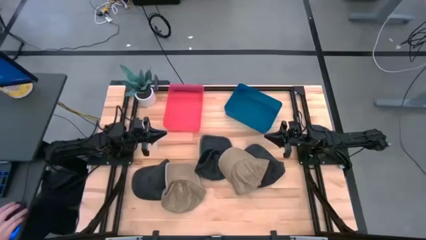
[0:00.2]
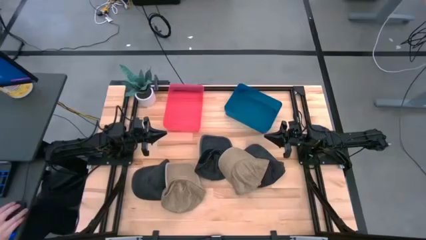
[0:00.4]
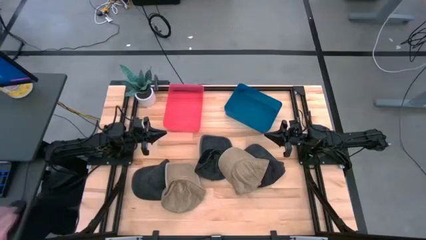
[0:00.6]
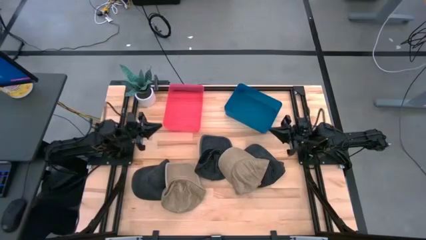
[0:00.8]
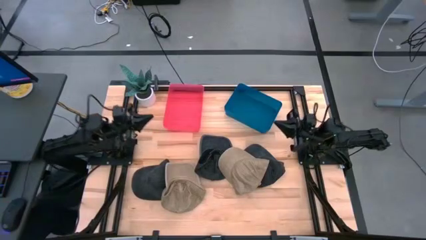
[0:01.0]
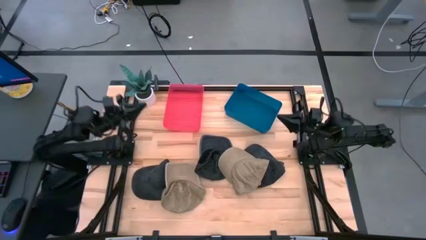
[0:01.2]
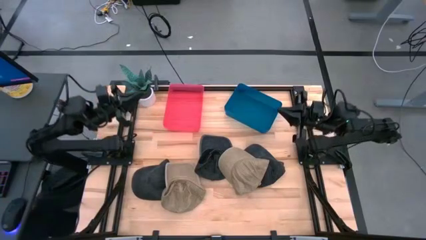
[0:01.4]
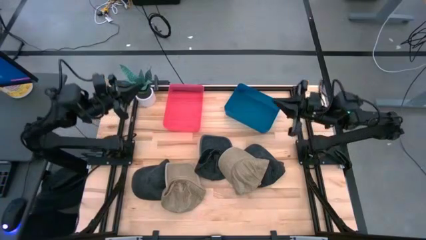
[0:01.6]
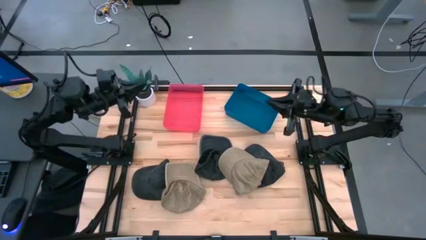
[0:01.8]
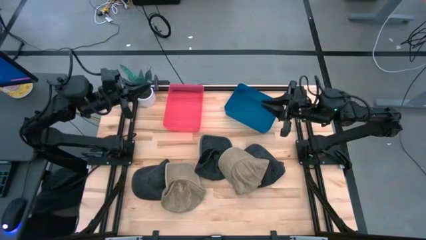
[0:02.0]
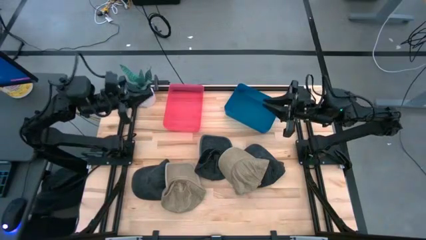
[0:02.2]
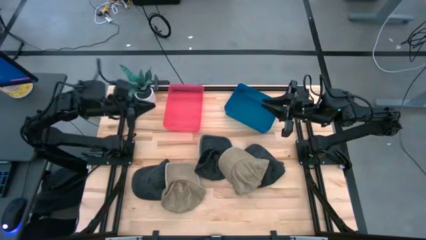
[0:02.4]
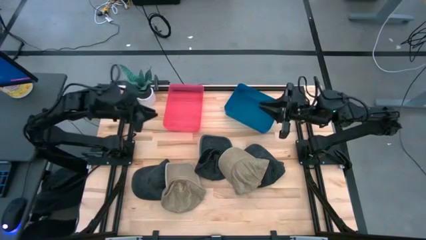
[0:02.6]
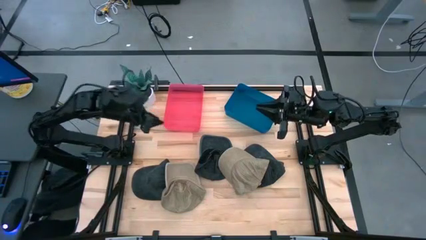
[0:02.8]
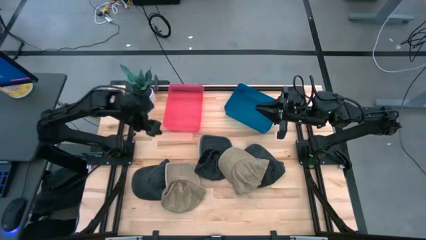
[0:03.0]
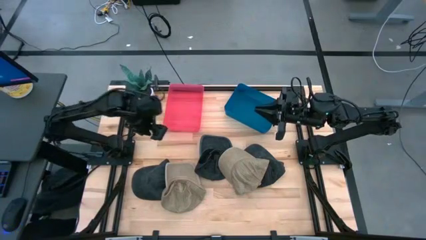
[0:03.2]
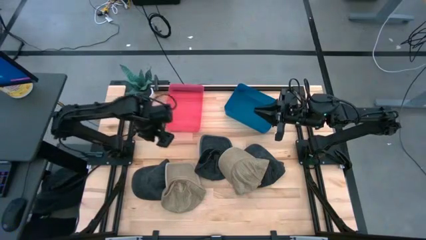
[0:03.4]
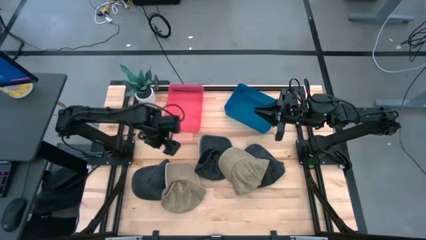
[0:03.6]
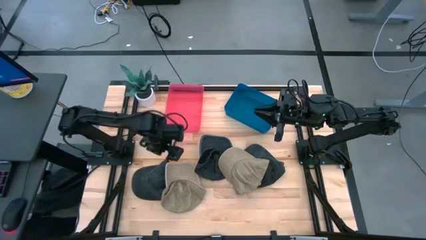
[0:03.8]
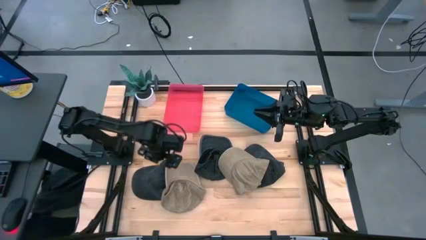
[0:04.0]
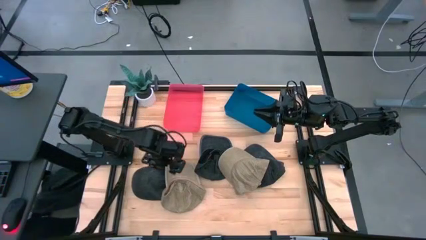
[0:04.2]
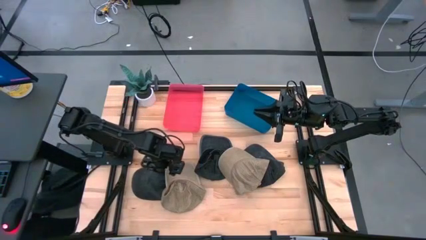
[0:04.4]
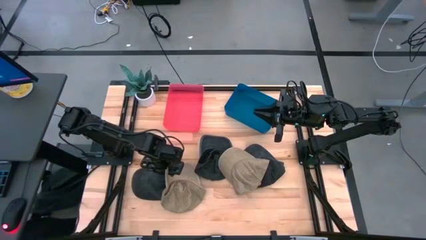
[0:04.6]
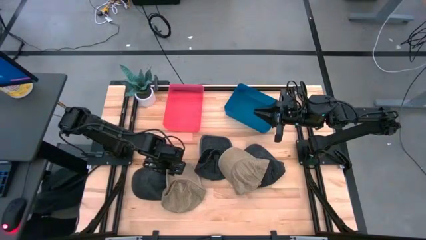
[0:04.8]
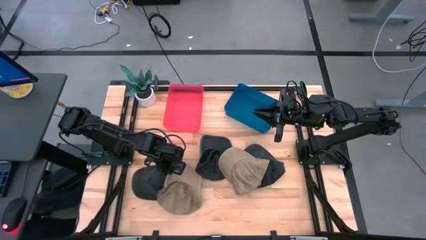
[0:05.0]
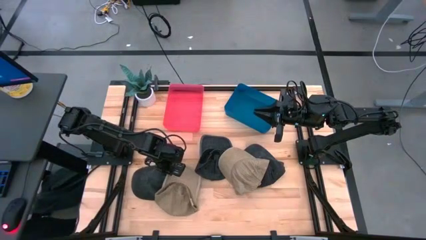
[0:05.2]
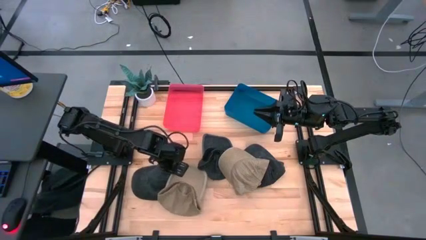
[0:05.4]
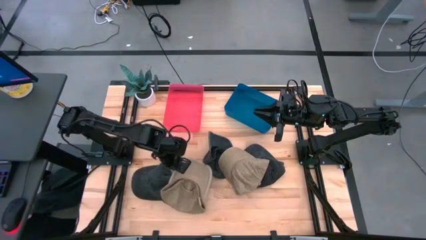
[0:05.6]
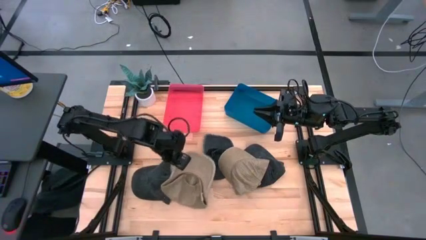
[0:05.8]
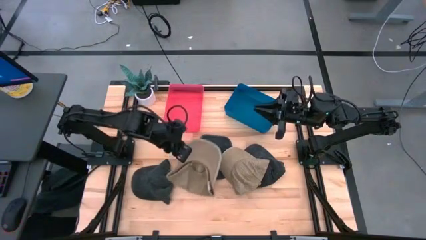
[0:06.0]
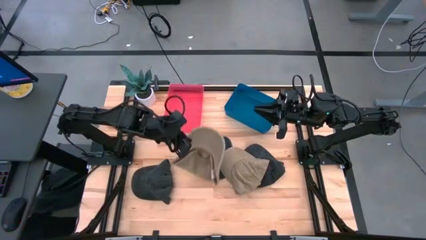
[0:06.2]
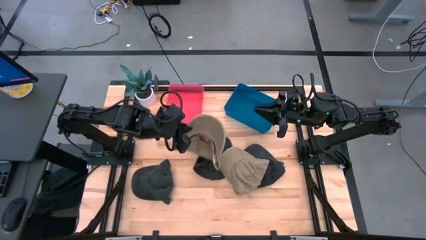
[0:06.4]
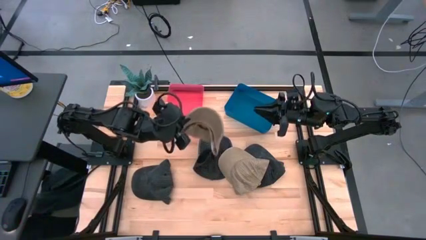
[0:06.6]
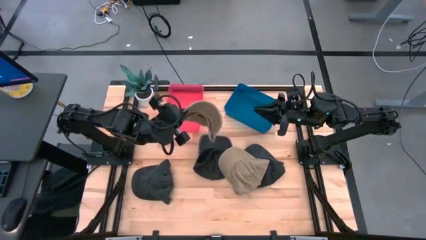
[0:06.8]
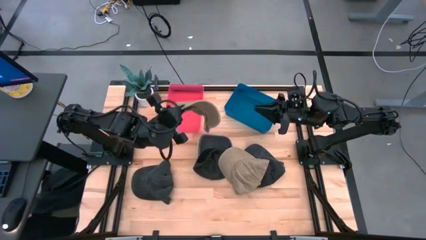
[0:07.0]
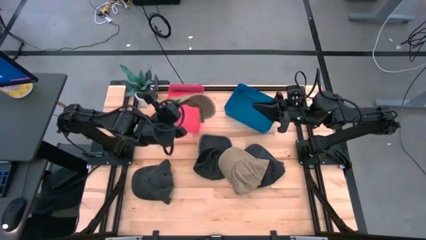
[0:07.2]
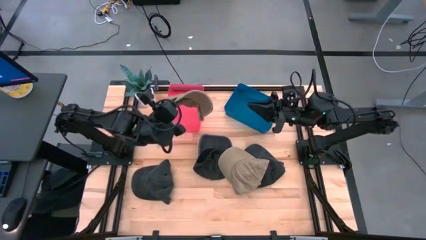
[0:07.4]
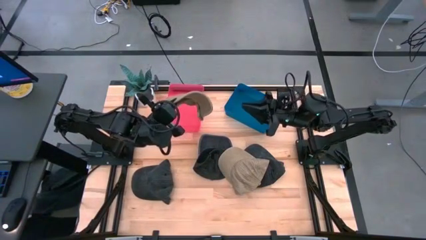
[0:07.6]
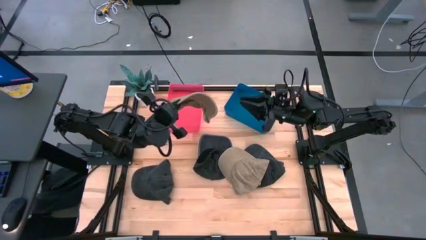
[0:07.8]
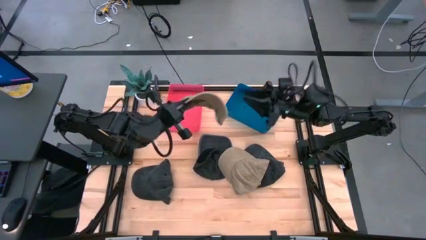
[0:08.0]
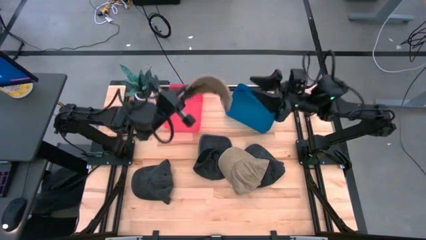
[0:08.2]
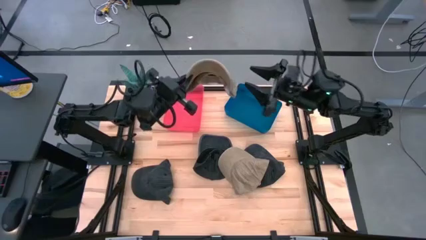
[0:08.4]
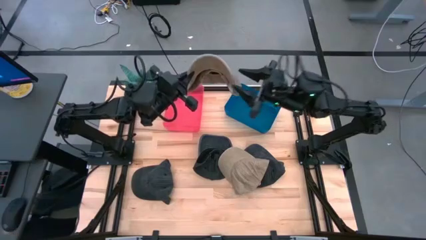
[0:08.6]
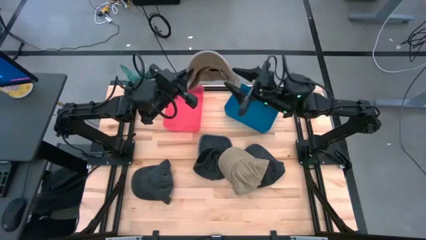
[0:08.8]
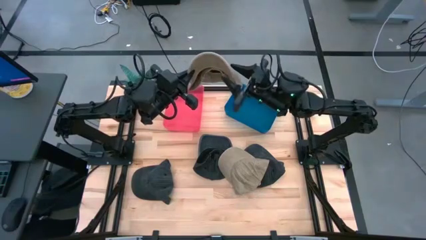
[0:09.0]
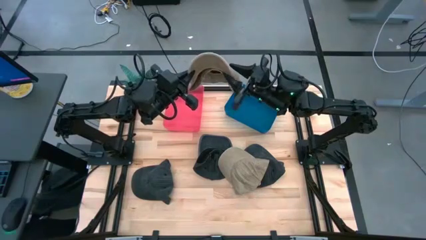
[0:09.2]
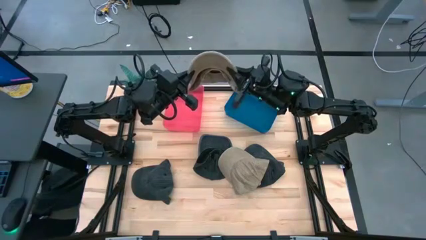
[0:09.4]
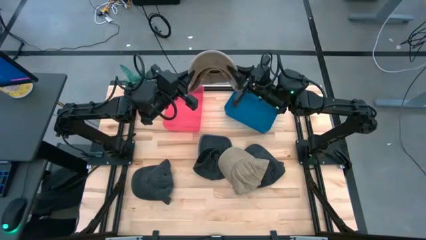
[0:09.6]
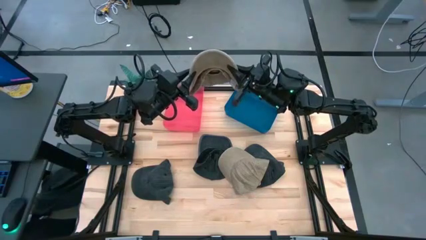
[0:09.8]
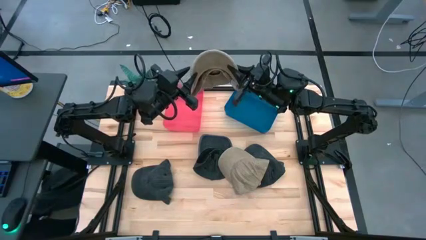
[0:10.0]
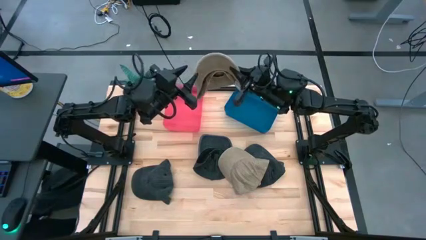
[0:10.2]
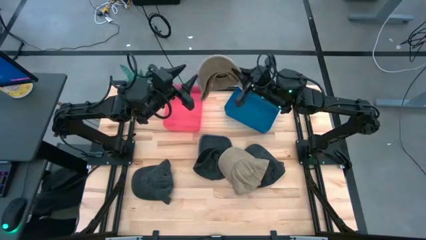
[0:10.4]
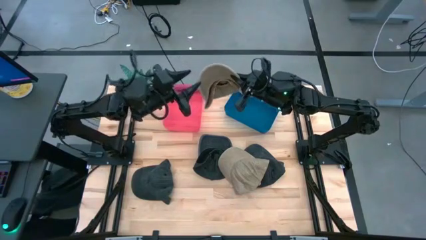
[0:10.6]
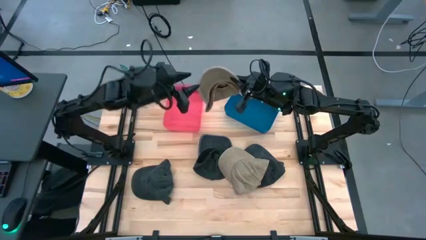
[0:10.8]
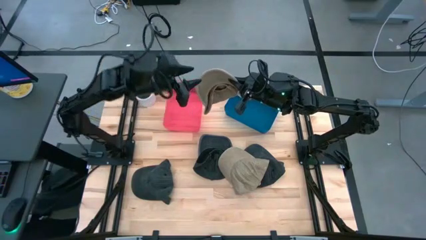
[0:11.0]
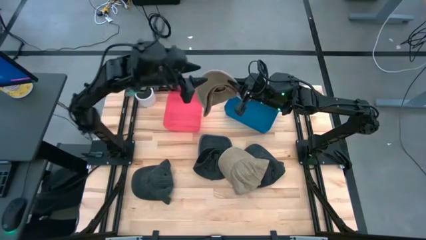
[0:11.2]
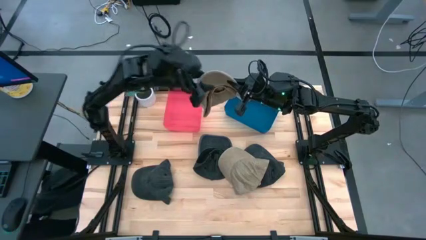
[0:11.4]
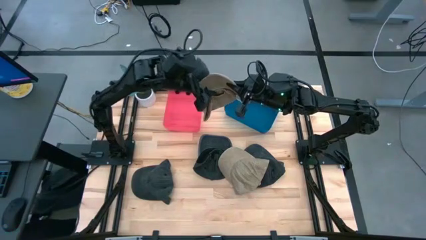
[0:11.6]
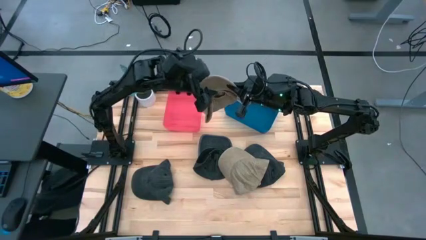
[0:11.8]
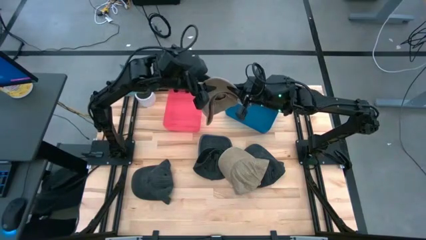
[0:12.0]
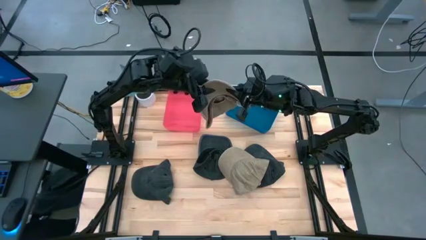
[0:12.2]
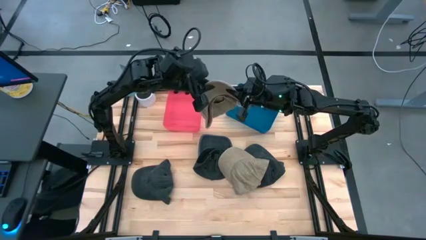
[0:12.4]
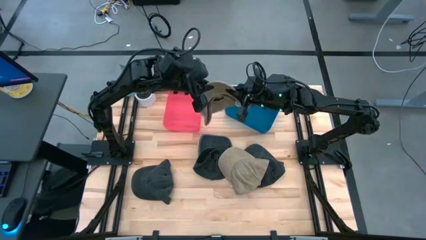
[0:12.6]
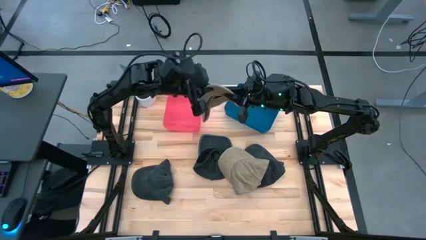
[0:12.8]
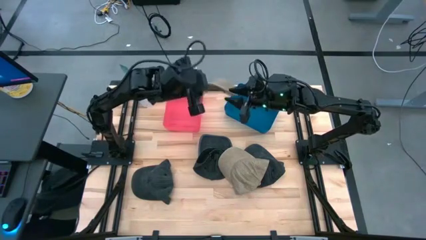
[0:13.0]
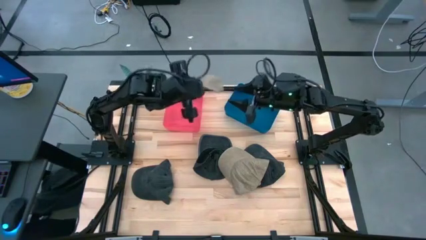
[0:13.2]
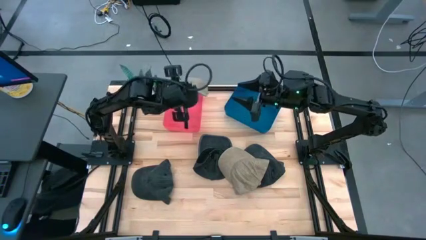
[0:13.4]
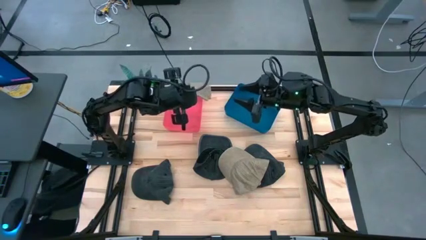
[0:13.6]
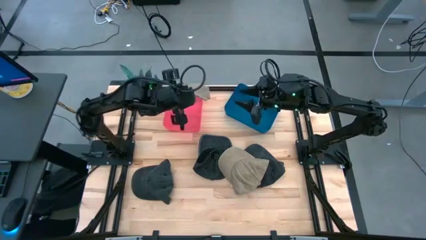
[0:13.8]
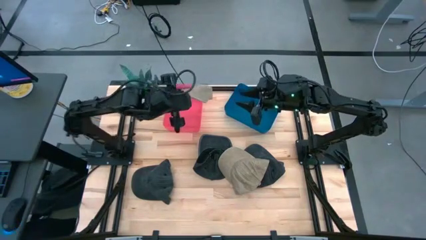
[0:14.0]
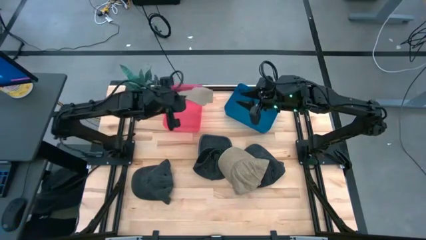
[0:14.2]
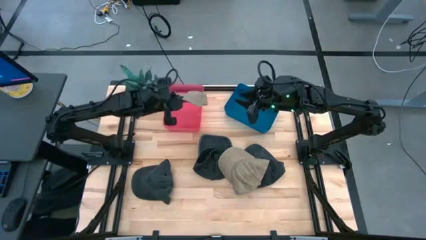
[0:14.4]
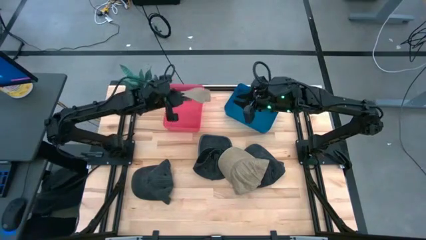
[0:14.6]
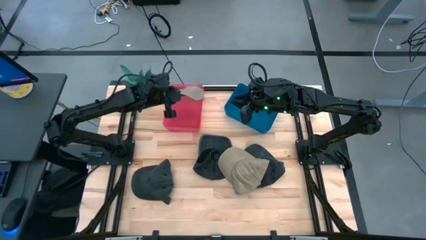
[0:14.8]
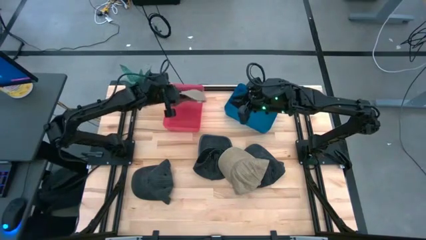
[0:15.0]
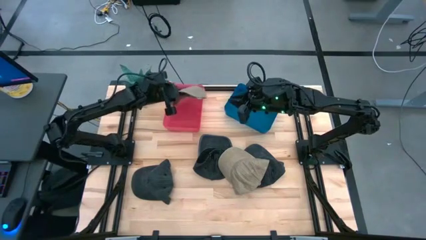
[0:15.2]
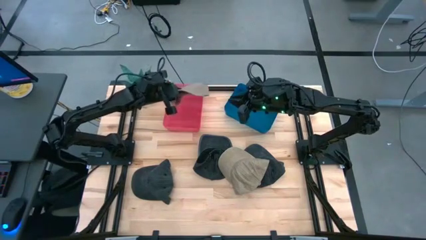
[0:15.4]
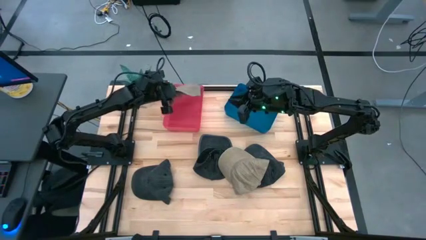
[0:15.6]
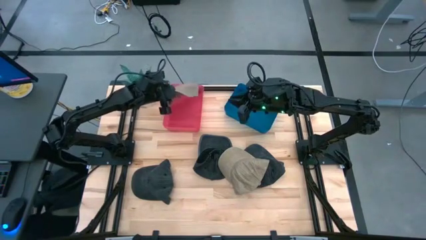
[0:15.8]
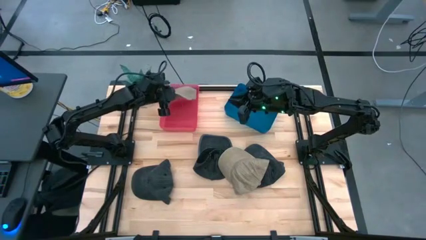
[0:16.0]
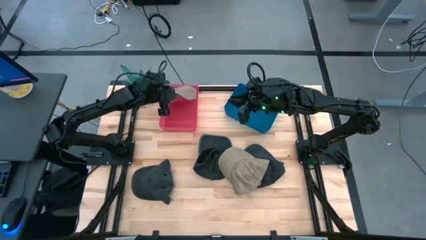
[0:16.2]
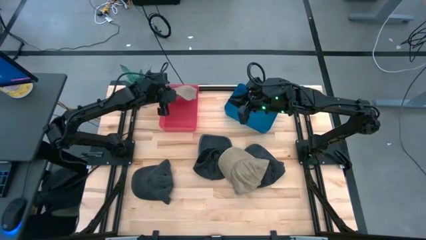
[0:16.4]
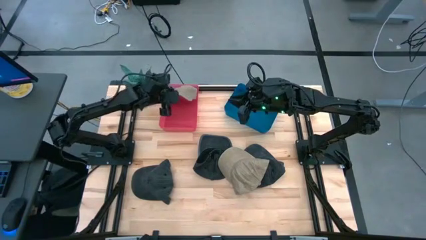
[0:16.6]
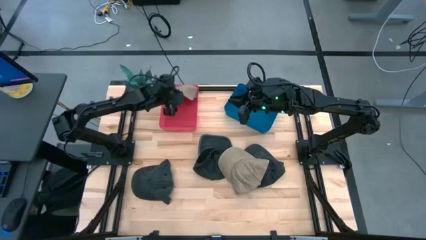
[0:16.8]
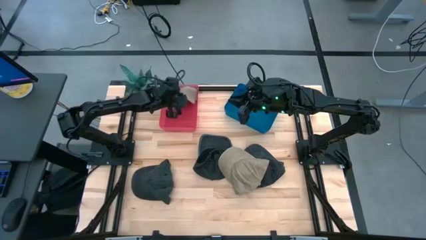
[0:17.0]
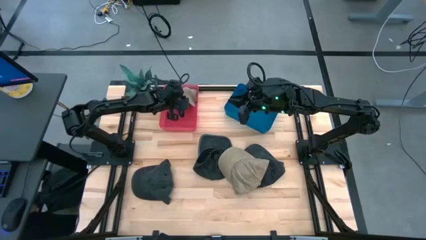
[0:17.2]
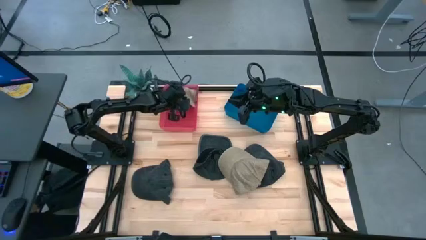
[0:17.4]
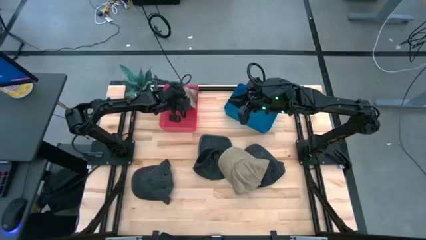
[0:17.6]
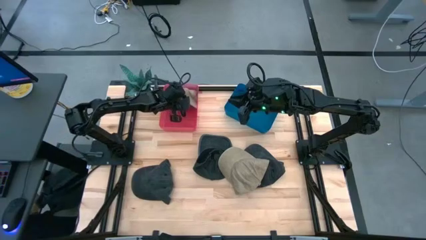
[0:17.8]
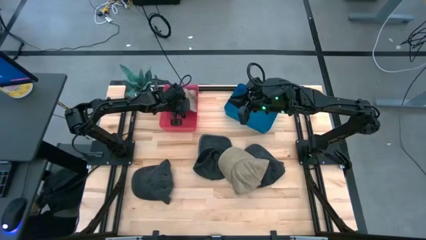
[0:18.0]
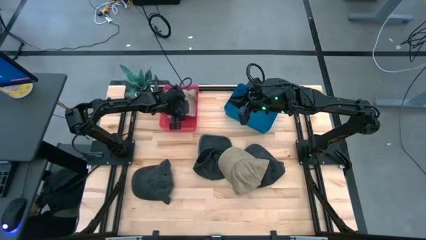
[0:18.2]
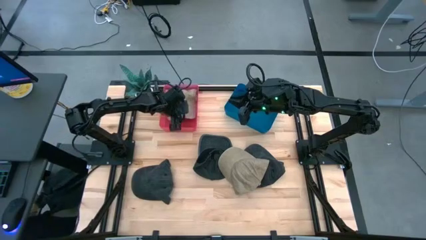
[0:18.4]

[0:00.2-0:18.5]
Task: Pick & Place hat
Put the left brown cap into the red bin
